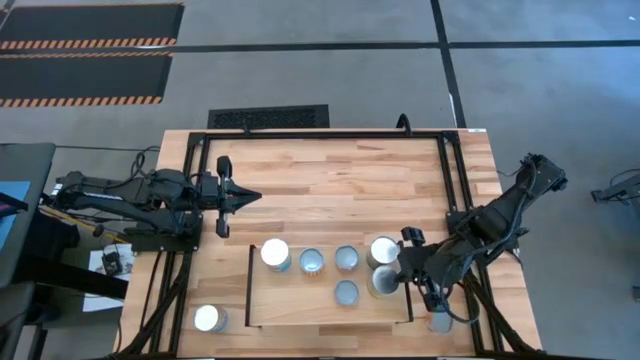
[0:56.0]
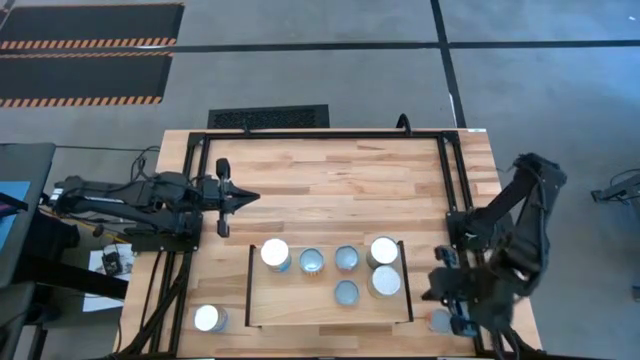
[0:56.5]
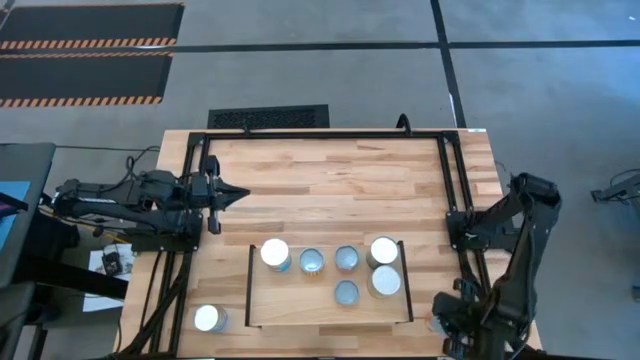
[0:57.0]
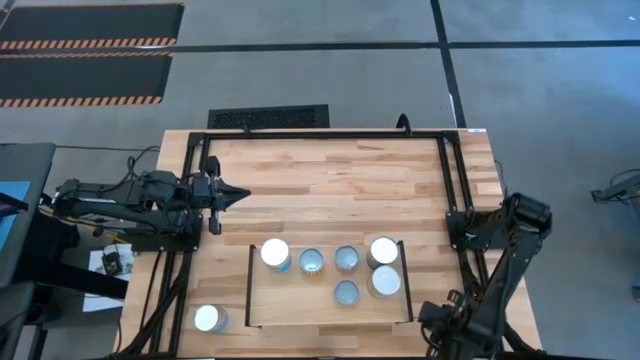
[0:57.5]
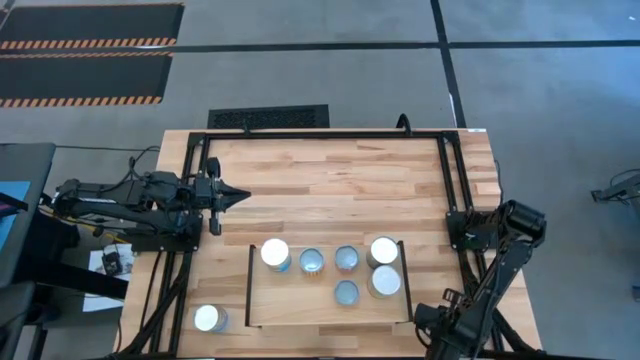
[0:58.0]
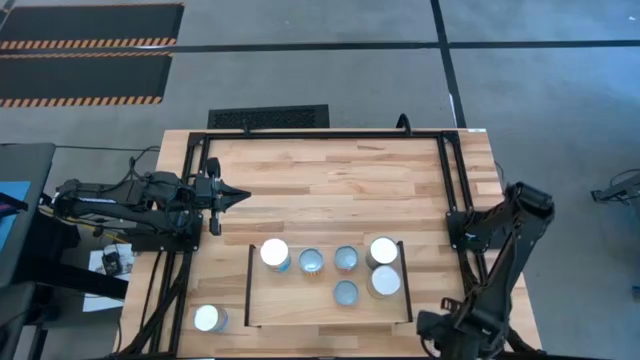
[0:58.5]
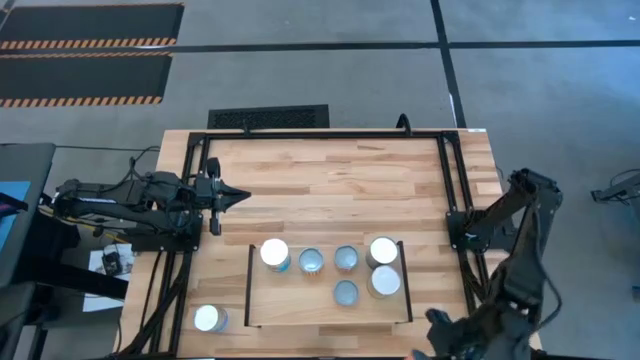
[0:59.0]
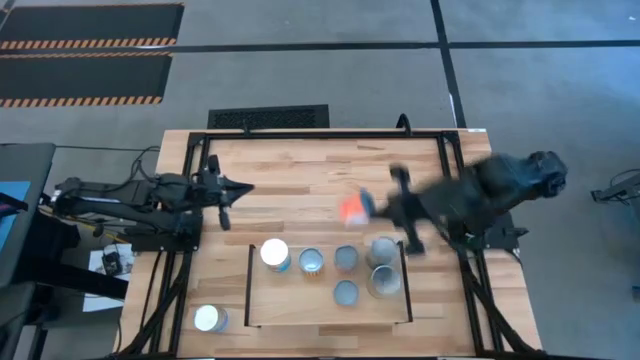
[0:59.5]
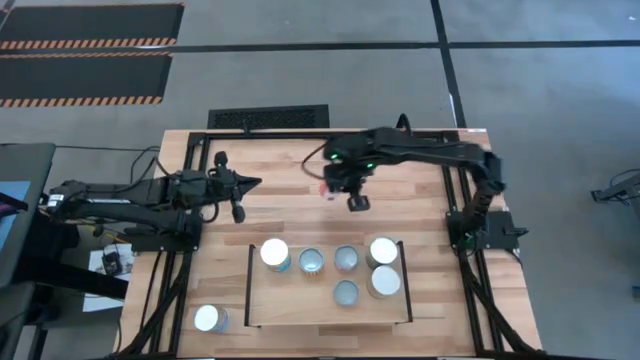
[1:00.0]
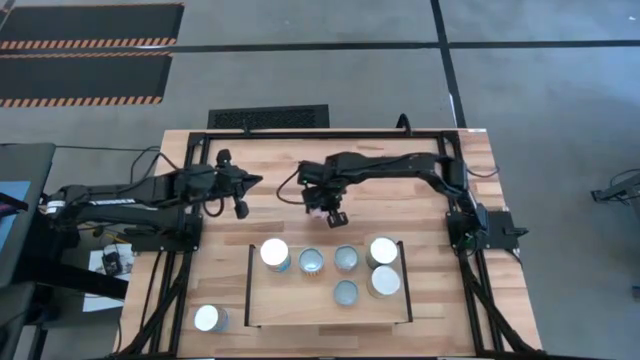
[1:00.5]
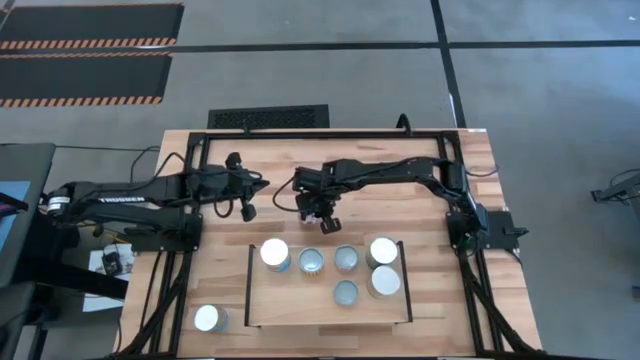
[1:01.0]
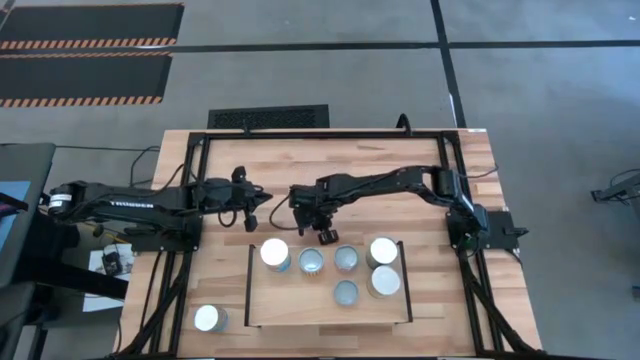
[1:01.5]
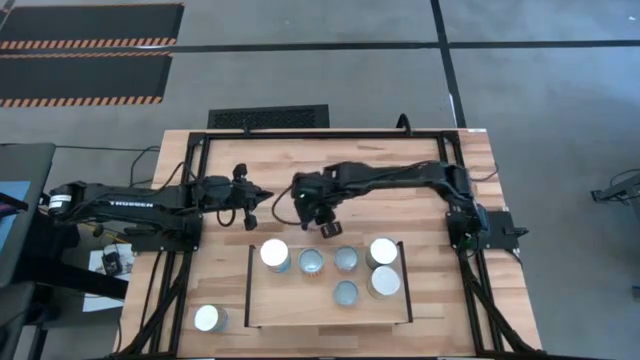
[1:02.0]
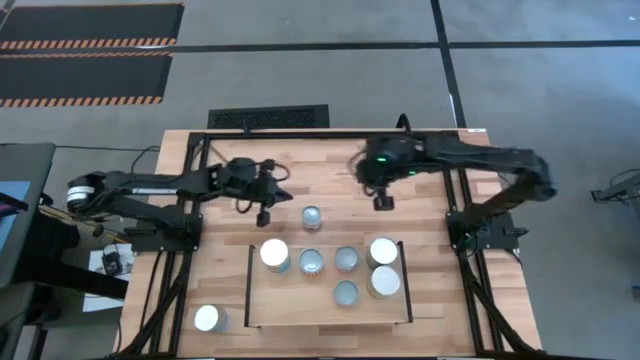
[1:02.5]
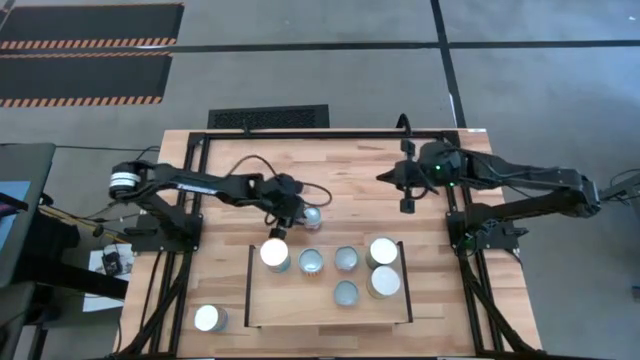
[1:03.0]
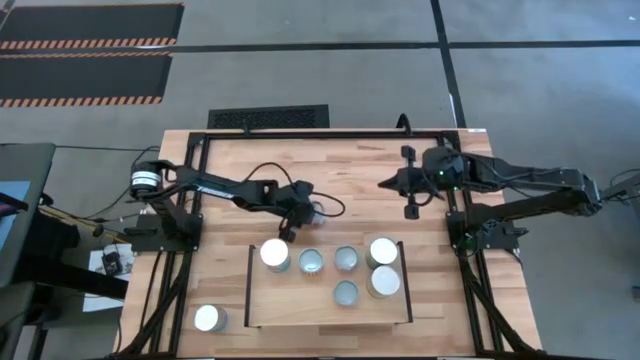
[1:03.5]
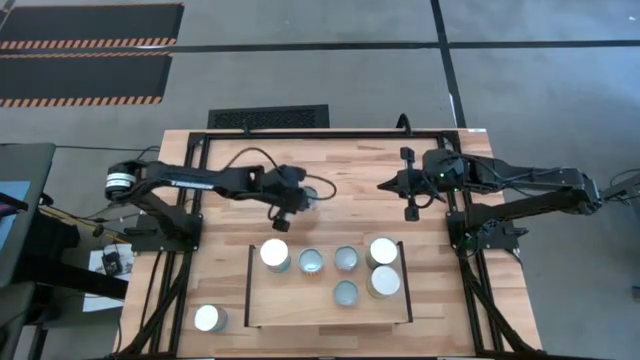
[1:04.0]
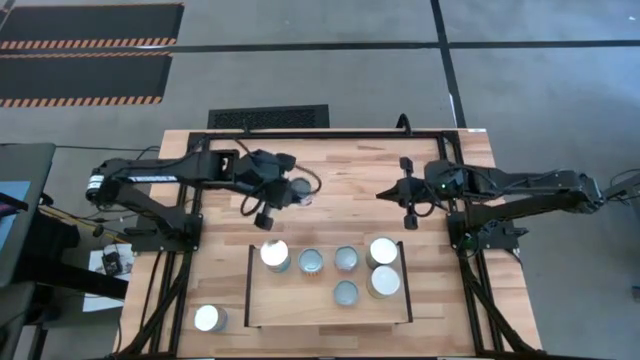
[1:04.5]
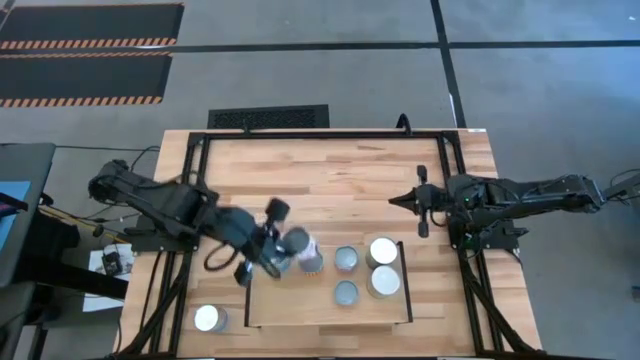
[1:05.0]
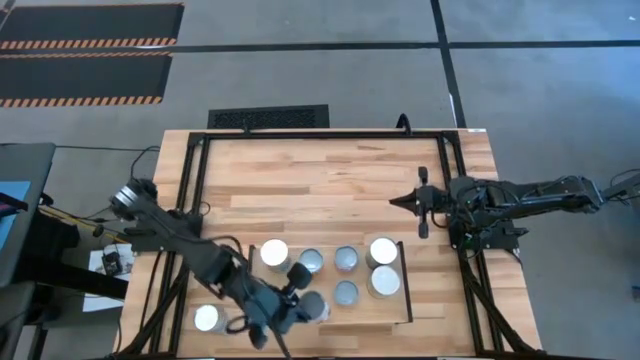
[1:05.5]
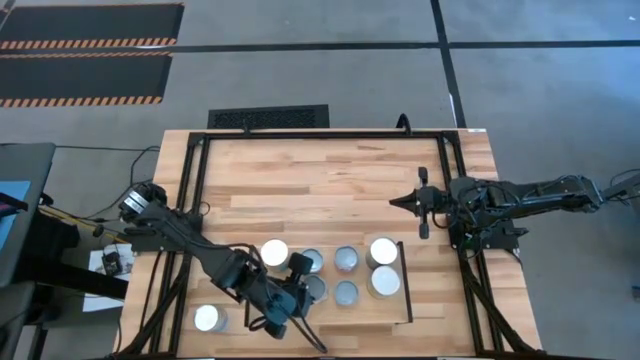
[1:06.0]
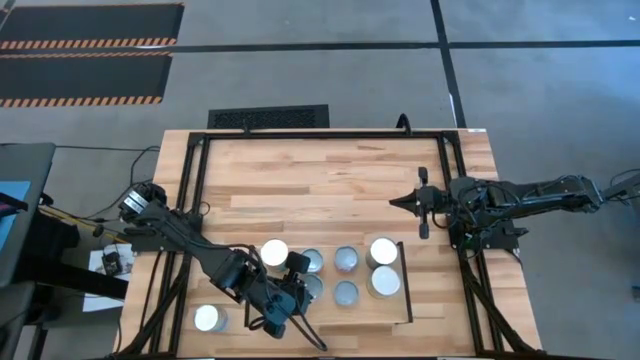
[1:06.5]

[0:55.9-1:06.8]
Task: Pick and place cans onto a shelf
Put the canned meatballs on the shelf

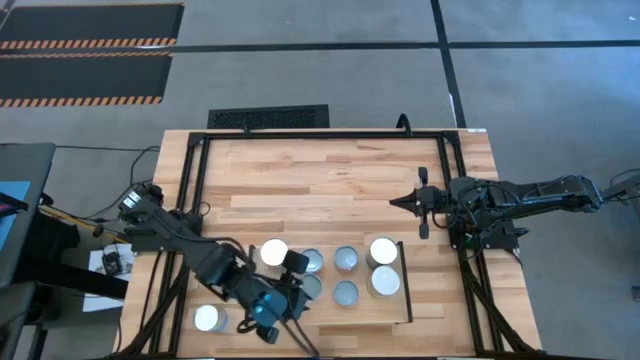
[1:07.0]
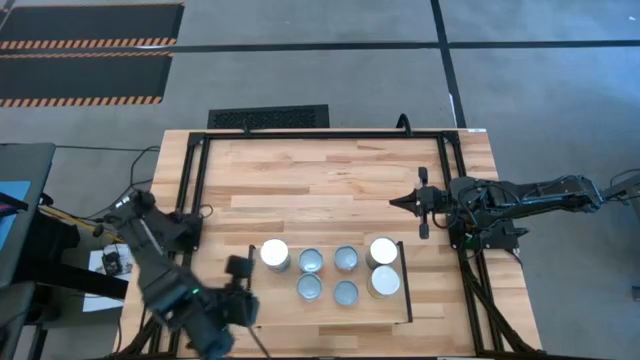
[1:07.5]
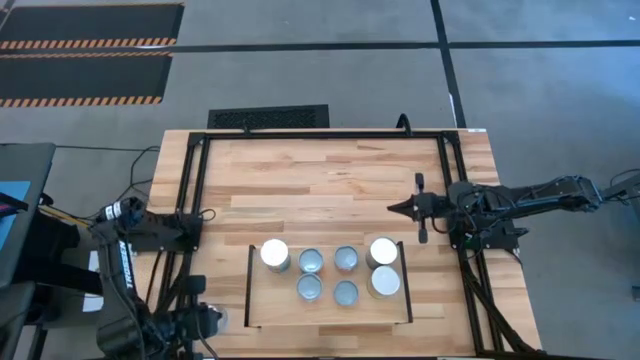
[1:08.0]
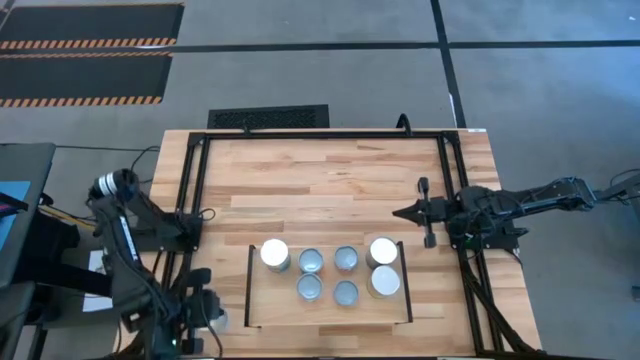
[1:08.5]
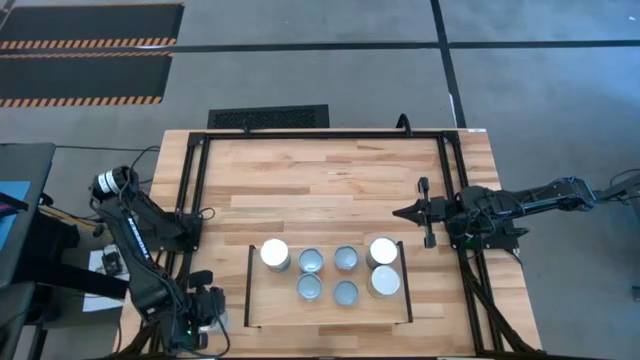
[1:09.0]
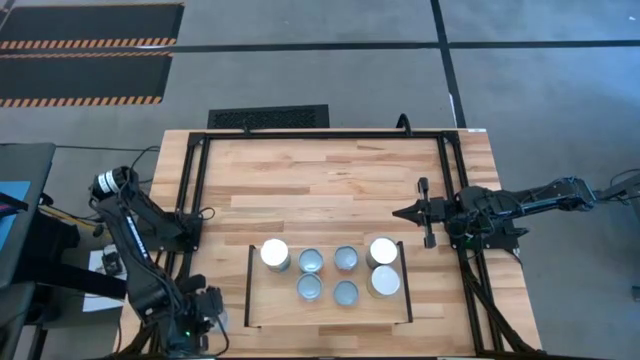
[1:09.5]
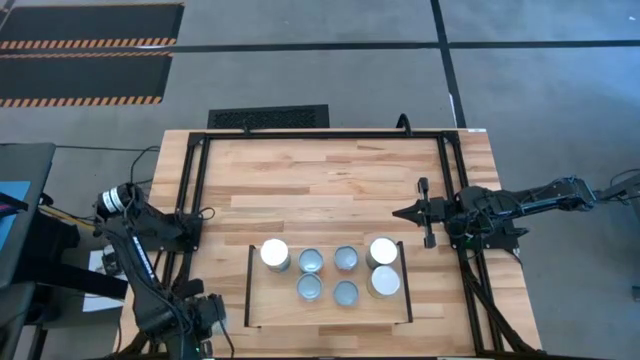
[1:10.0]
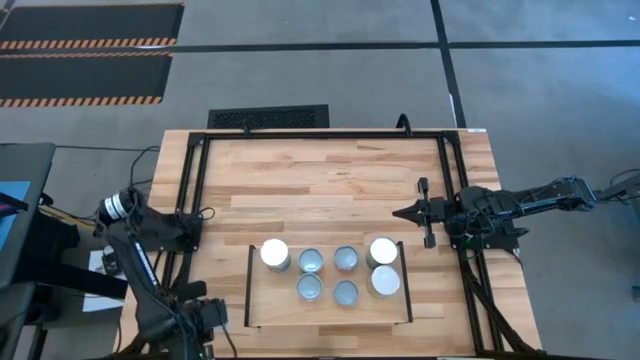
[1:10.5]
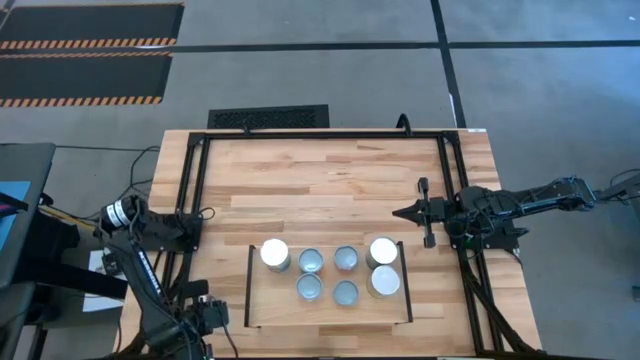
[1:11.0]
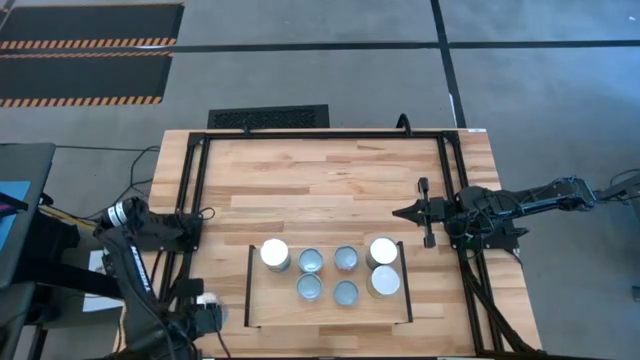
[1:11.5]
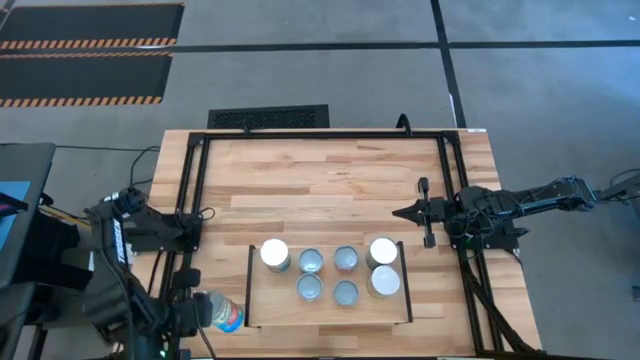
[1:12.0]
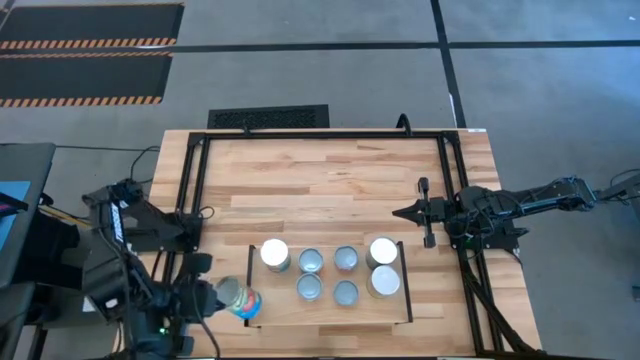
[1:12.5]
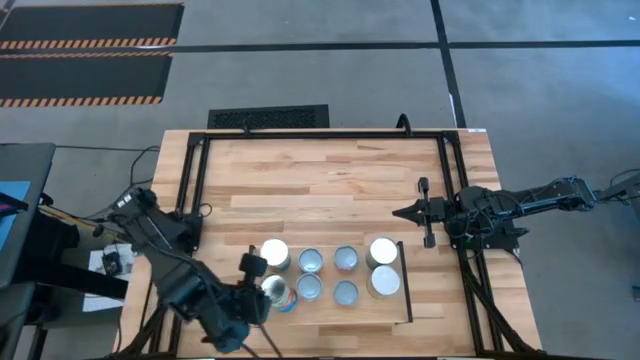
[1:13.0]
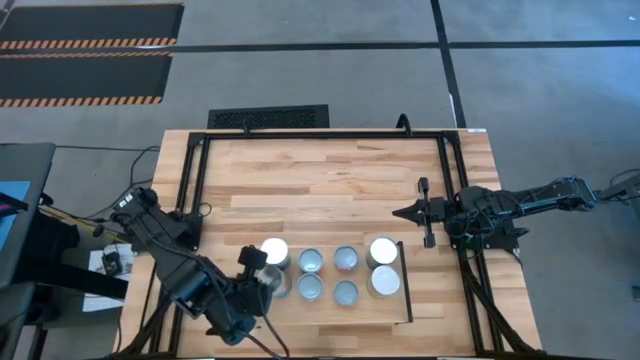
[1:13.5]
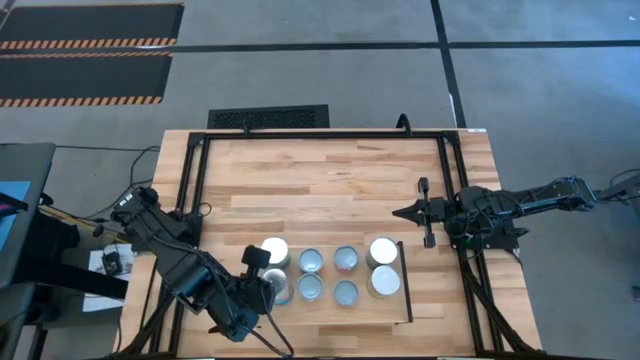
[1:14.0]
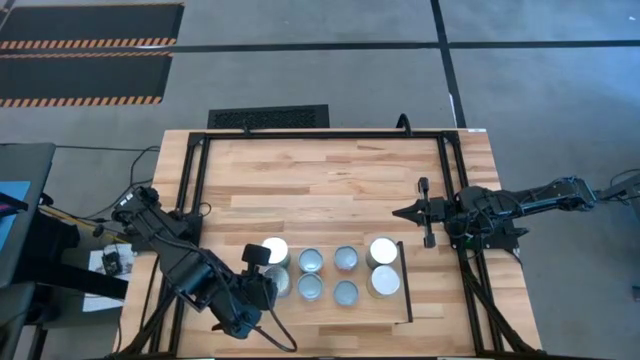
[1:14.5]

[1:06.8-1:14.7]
Put the canned tomatoes on the shelf

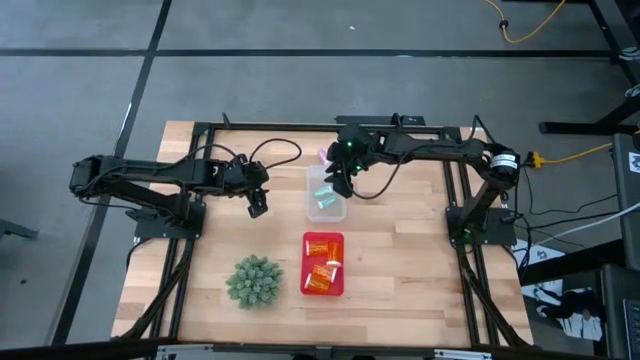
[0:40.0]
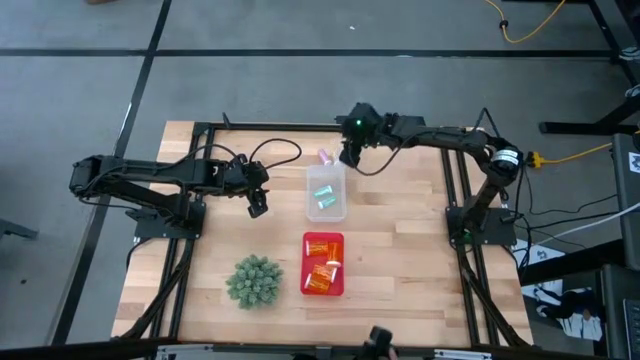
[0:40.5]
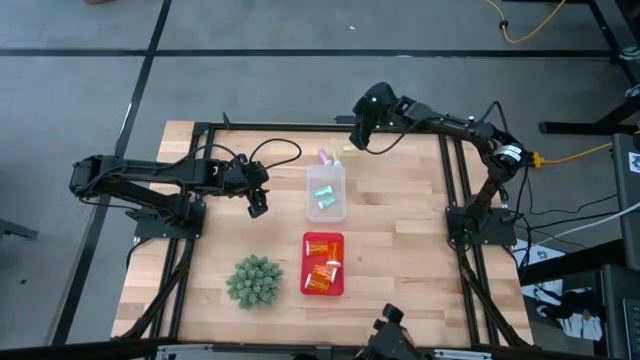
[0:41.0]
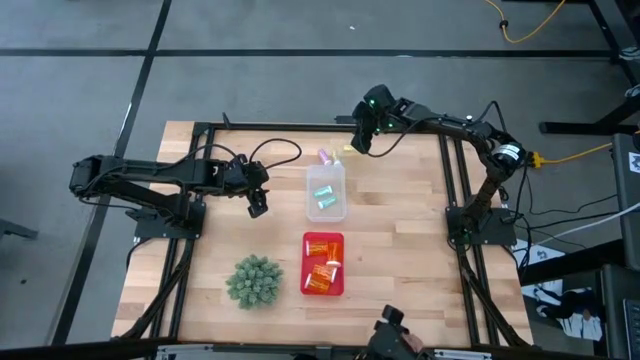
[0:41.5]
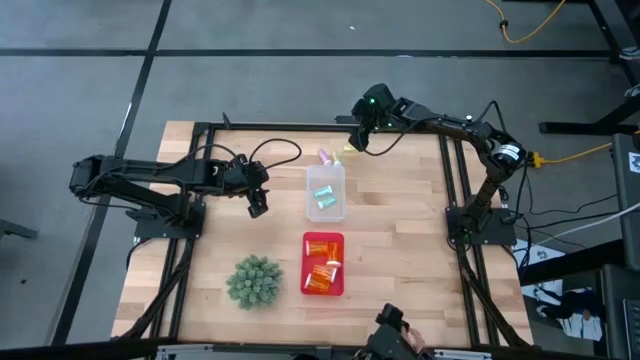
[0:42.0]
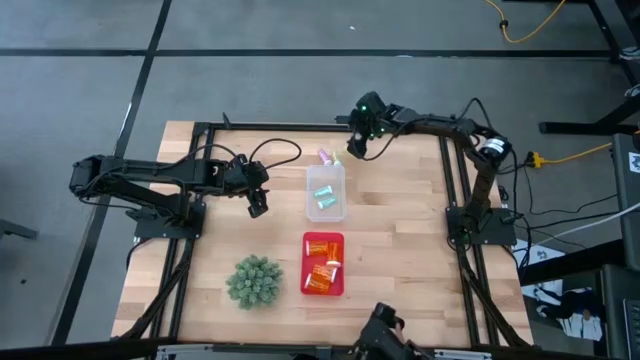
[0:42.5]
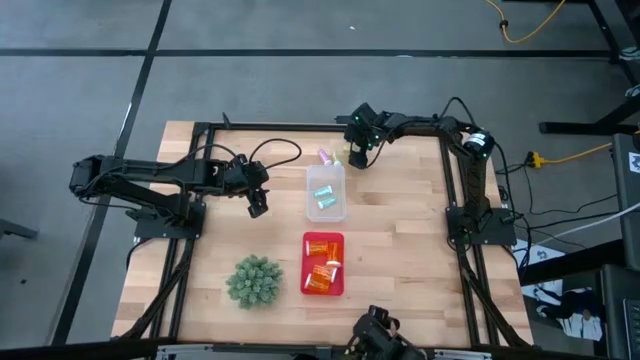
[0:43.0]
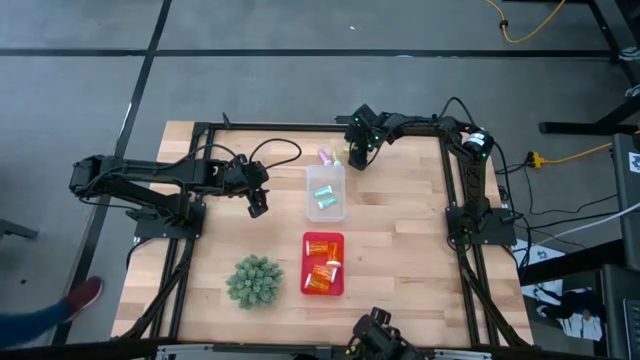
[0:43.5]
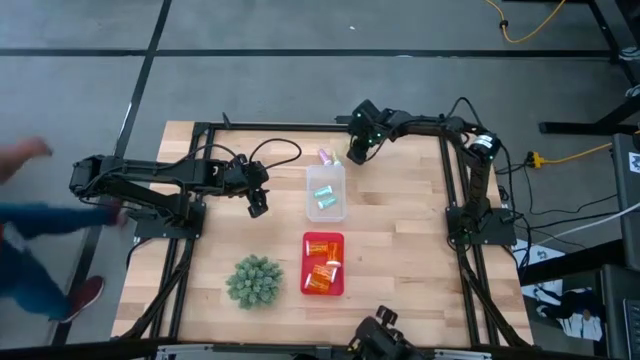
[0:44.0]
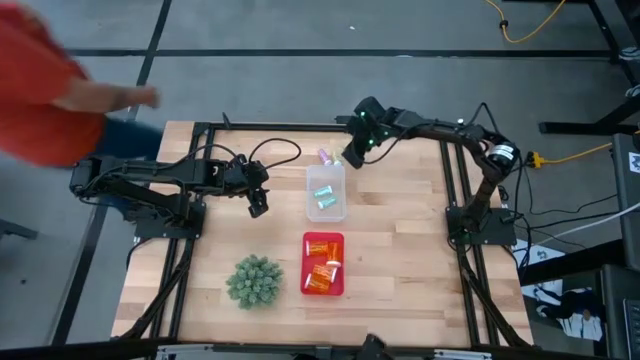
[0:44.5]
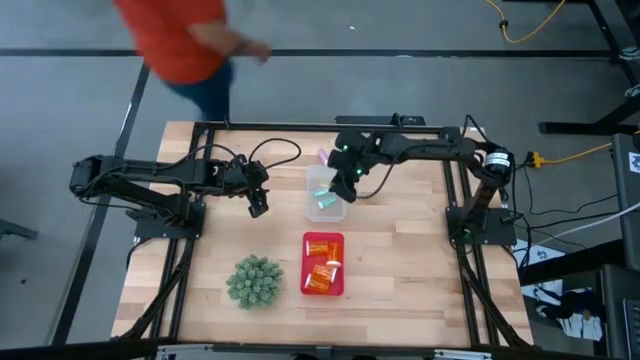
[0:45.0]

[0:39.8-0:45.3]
Task: Pick and place medicine bottles into bin by pill shape (circle, oval)
Put the right small yellow pill bottle into the transparent bin
